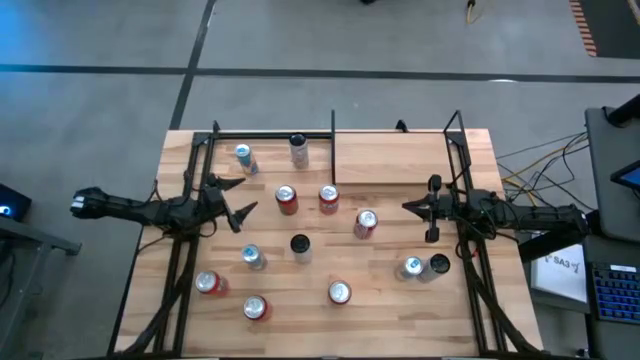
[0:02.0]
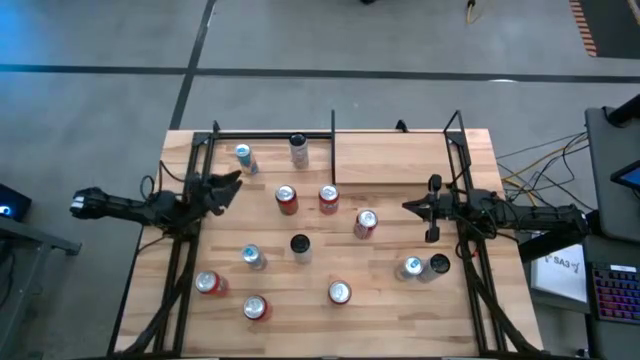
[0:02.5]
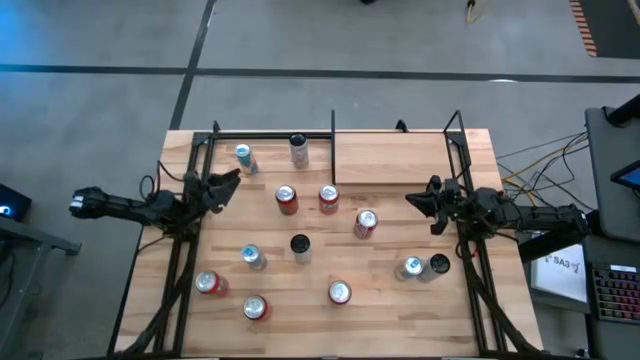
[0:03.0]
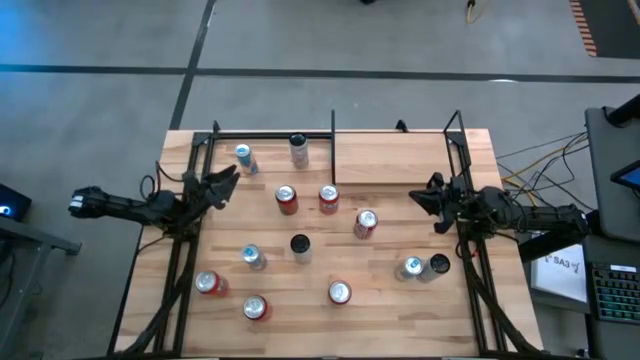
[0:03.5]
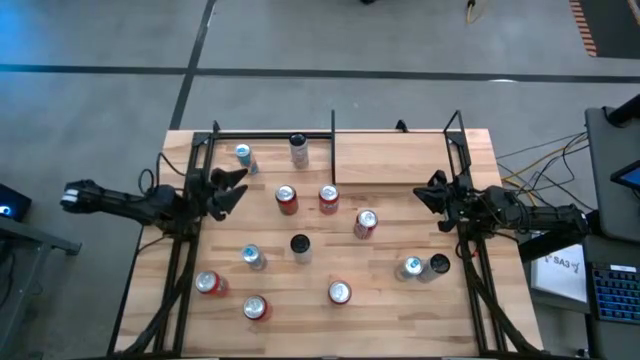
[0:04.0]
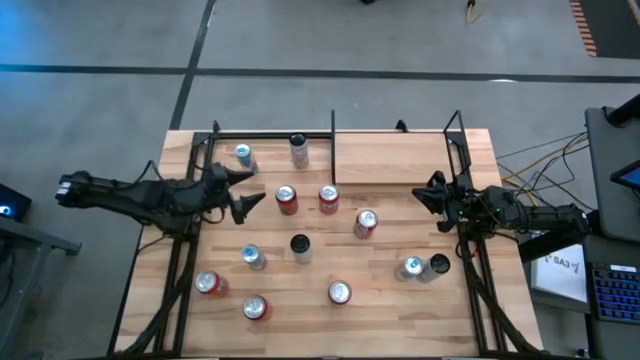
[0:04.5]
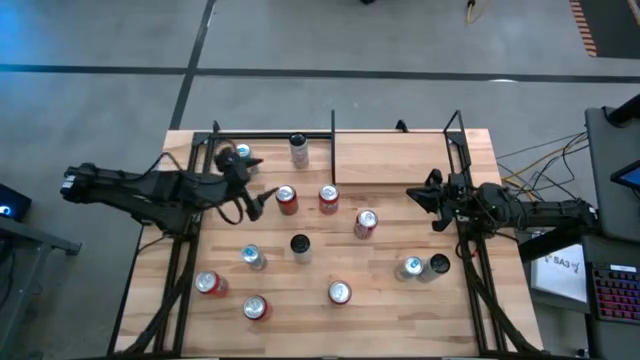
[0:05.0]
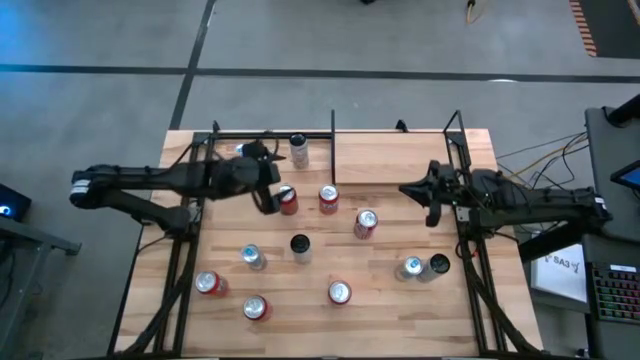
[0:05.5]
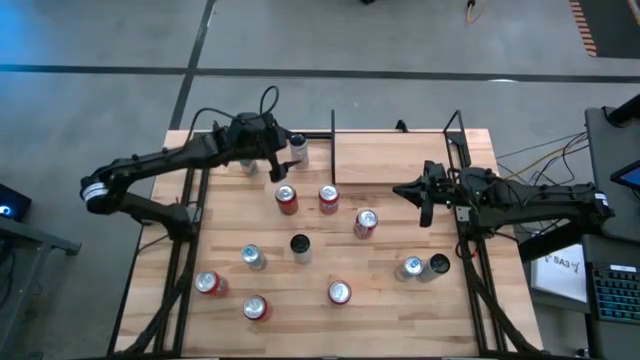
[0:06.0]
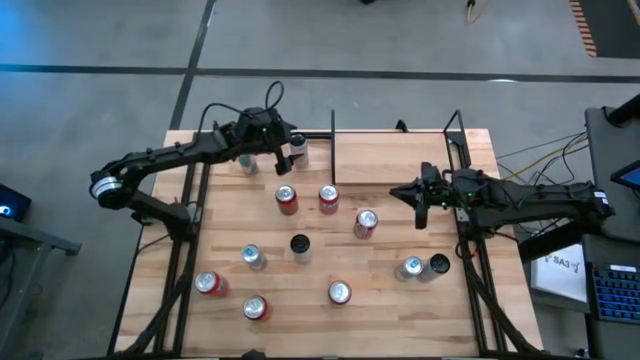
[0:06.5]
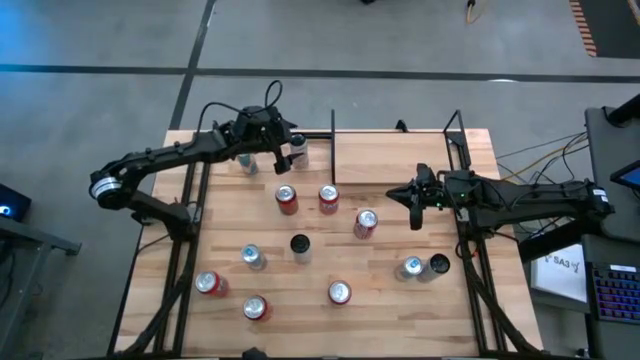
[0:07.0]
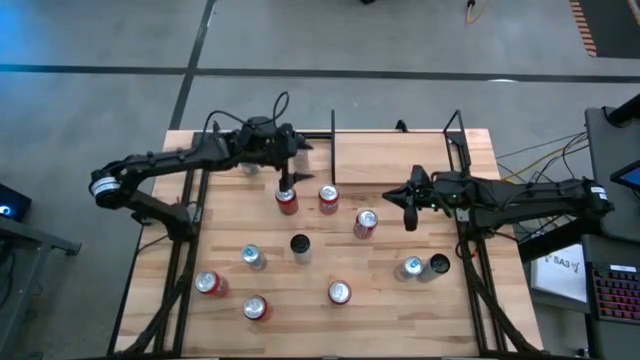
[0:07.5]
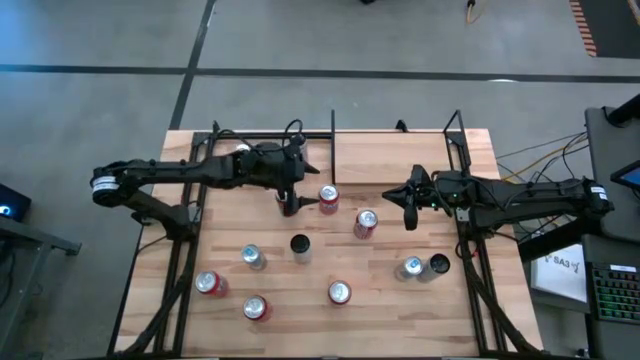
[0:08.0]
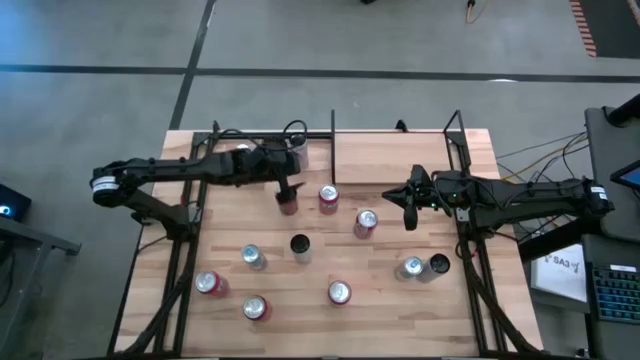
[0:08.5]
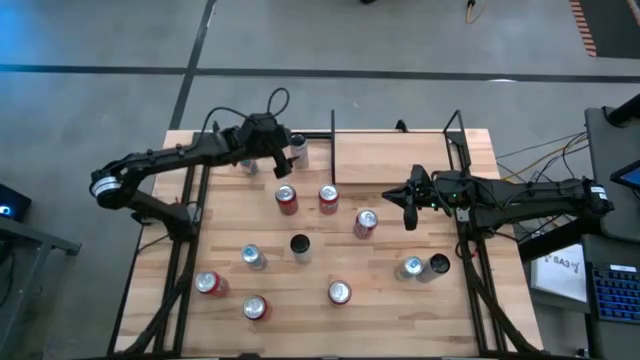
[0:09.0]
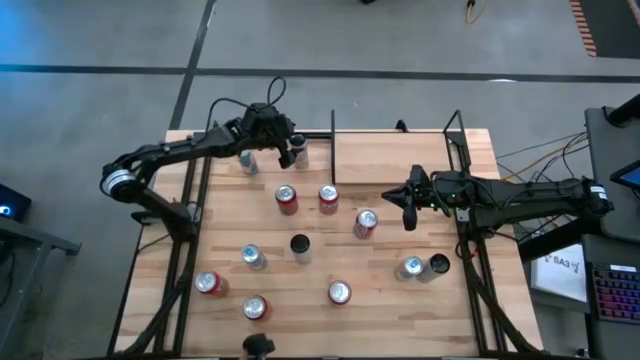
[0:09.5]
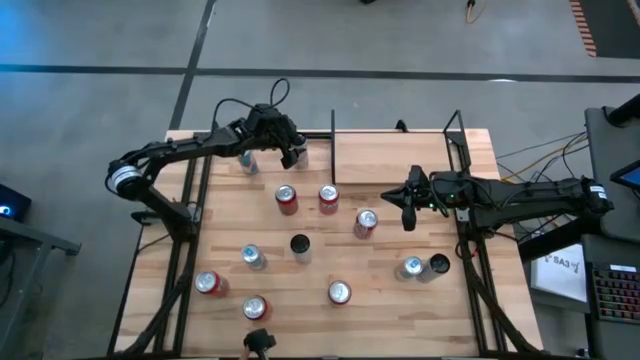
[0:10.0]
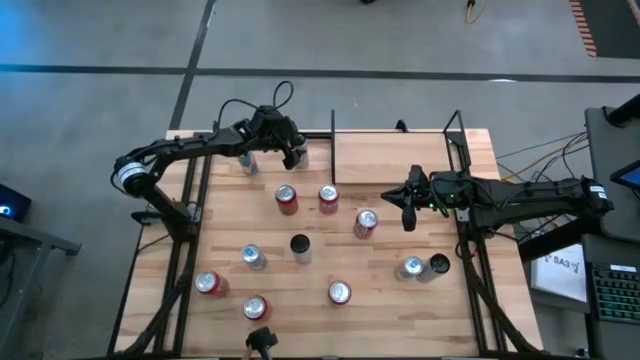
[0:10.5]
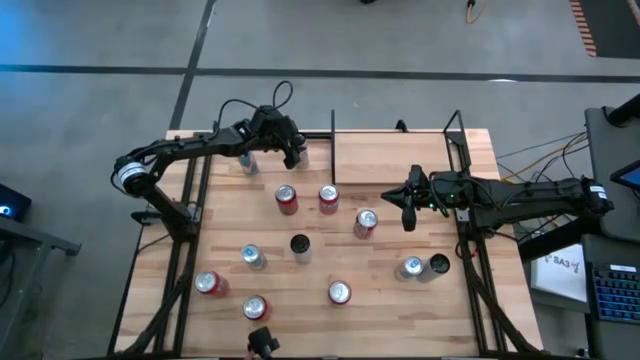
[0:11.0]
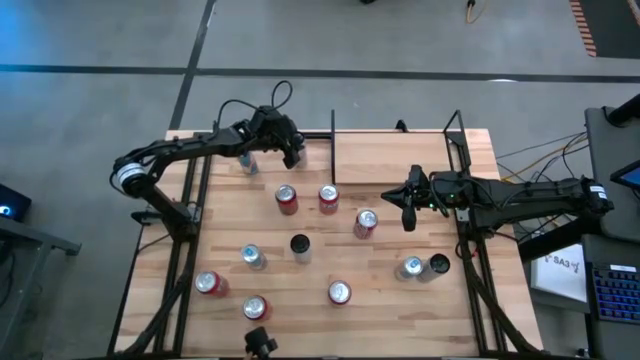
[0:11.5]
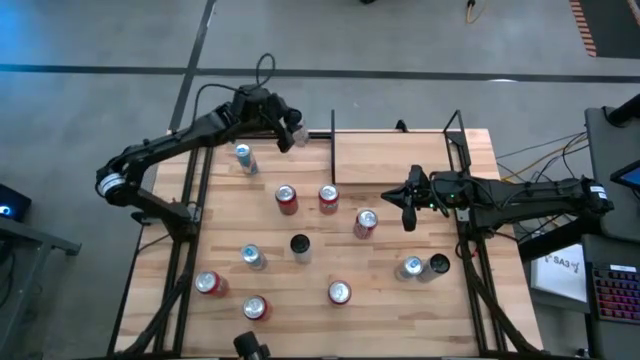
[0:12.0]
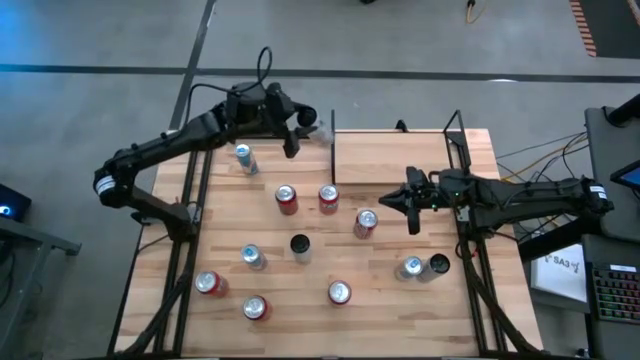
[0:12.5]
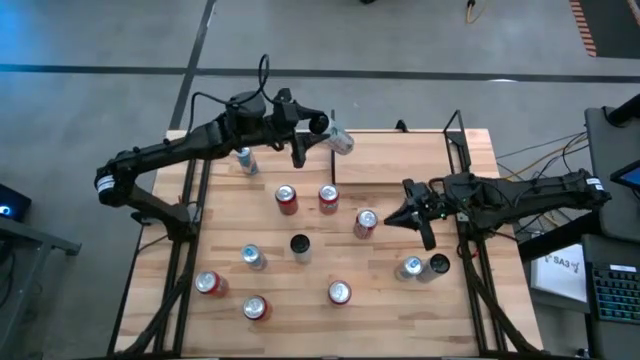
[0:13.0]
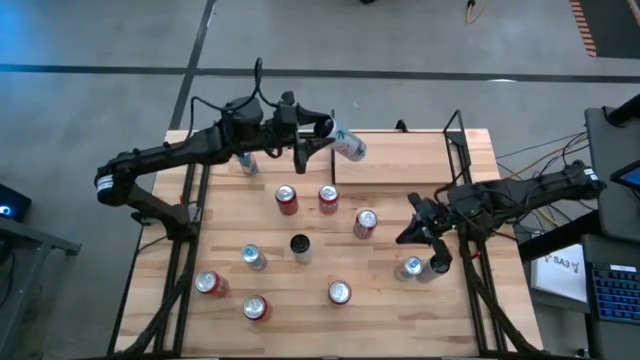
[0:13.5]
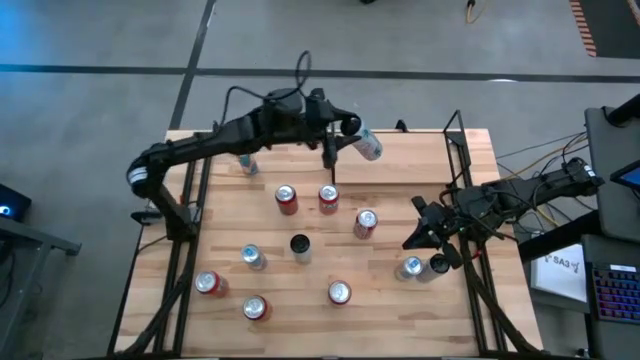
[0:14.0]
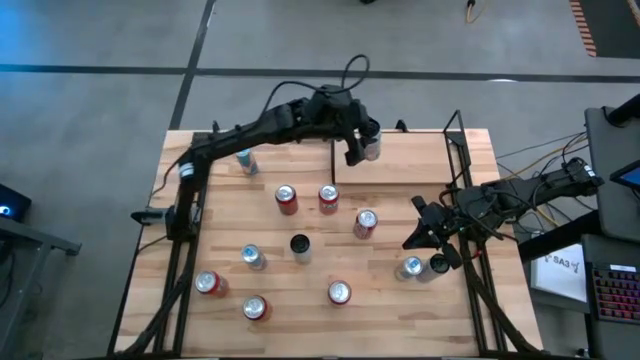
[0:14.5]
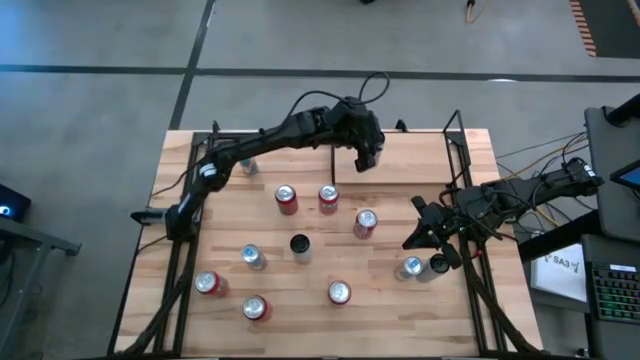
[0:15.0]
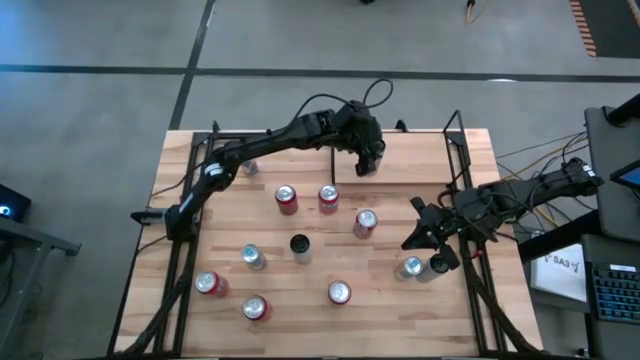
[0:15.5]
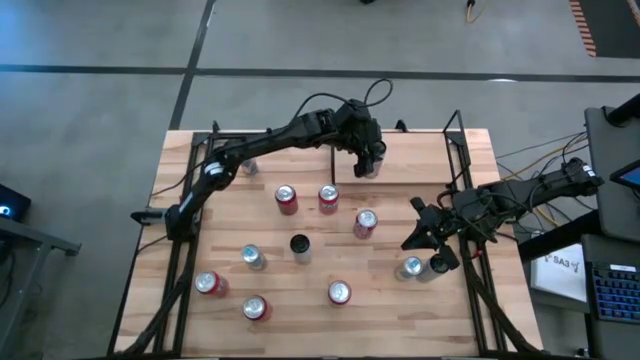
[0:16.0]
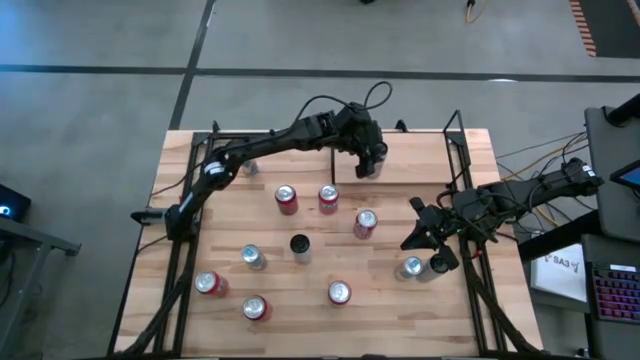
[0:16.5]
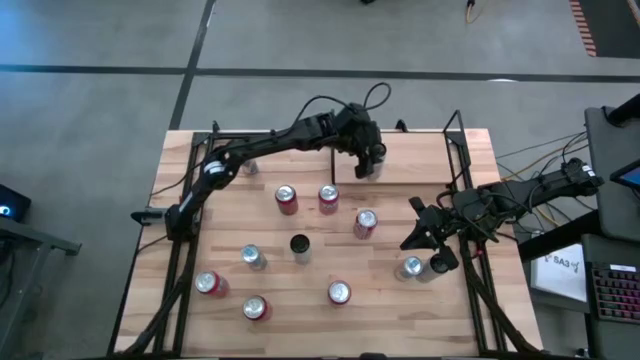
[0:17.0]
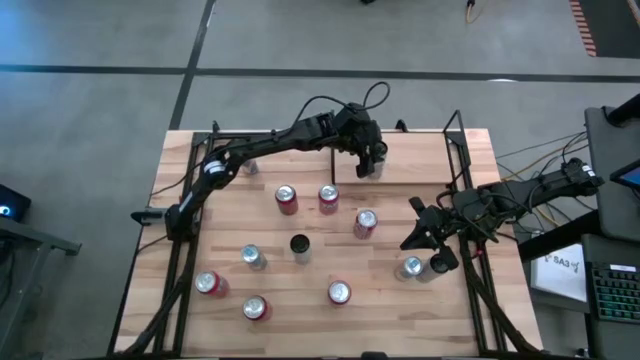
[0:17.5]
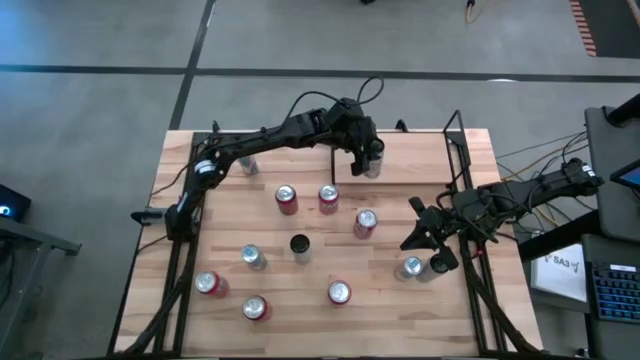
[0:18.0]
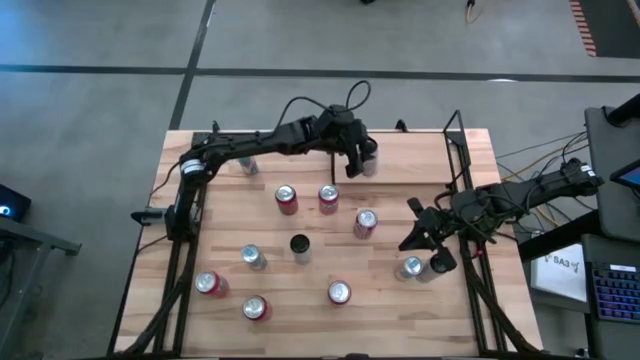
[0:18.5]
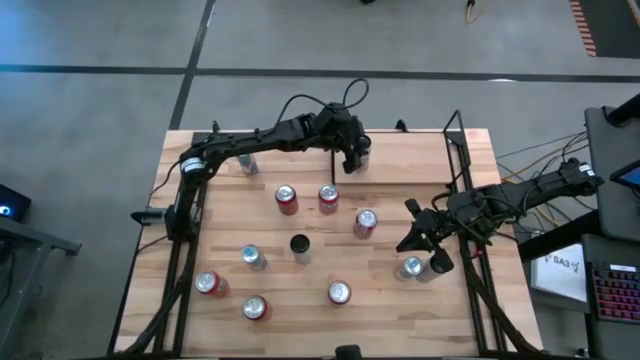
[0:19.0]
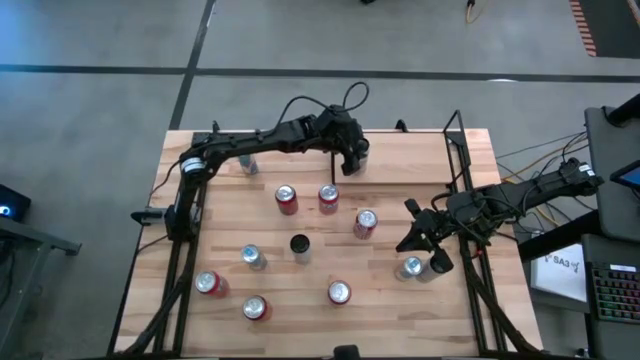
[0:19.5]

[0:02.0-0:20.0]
Task: Place canned beverage on shelf
Put the top white soda can on the shelf

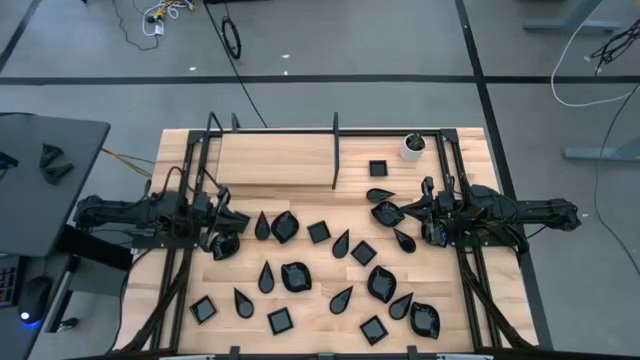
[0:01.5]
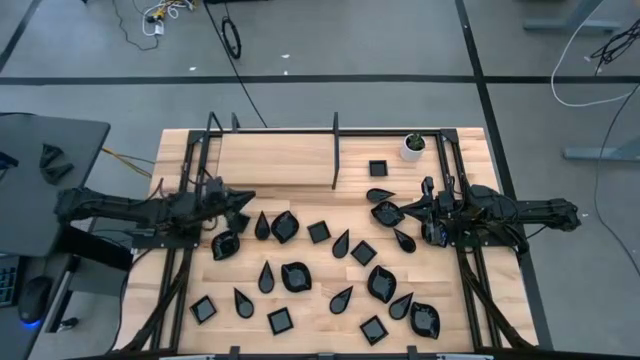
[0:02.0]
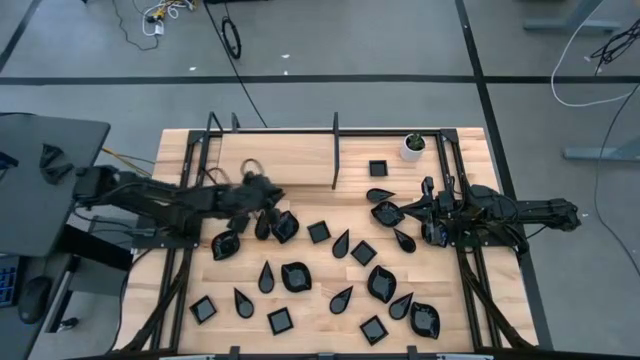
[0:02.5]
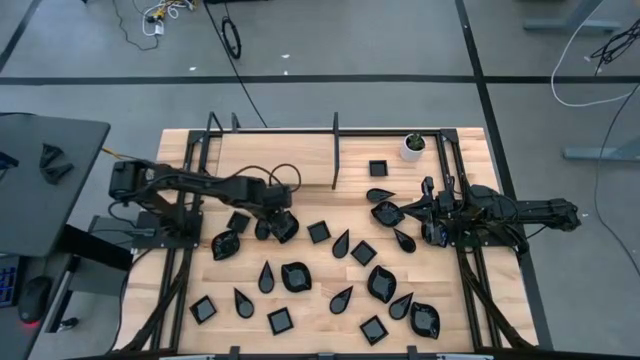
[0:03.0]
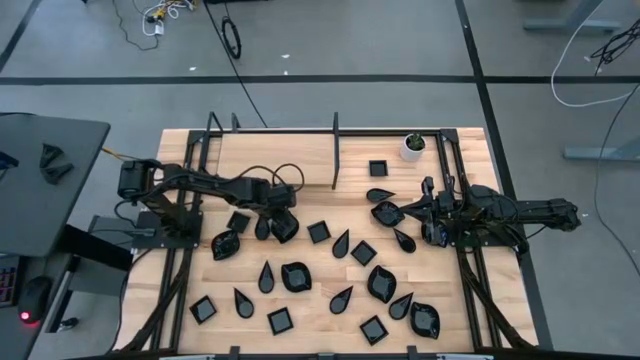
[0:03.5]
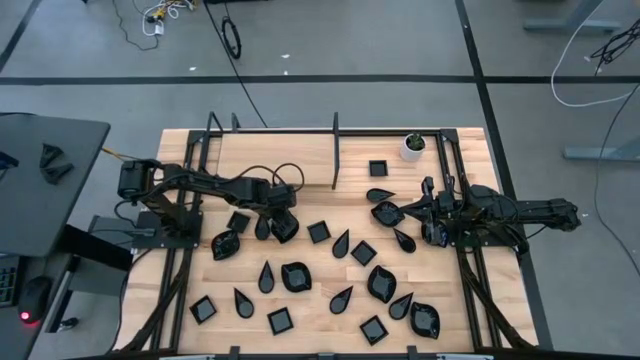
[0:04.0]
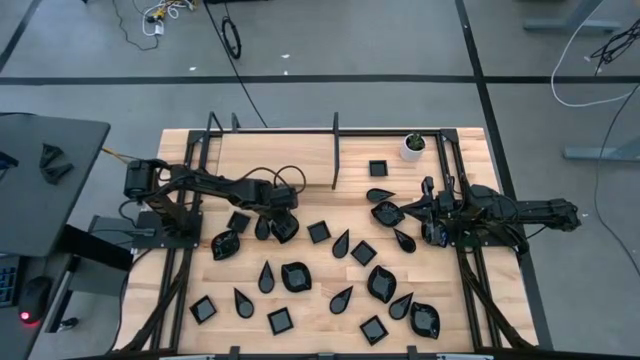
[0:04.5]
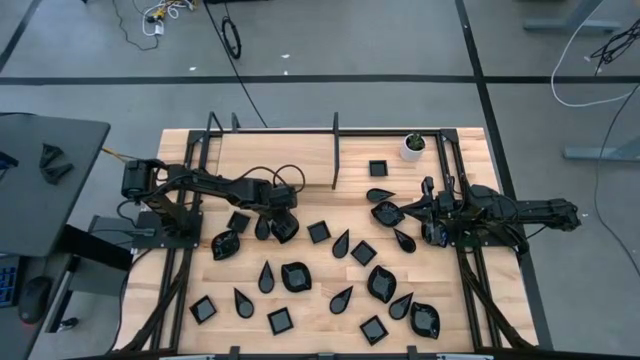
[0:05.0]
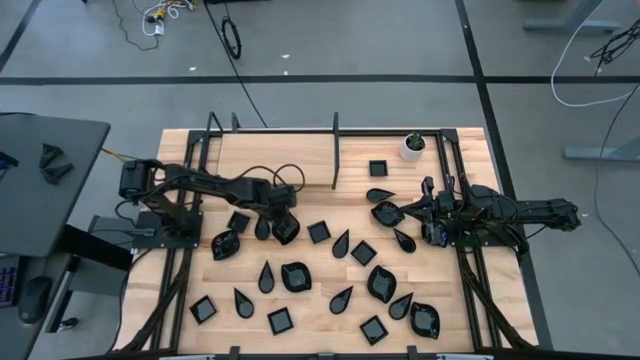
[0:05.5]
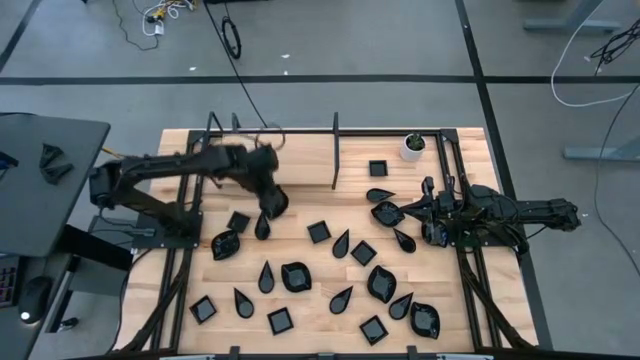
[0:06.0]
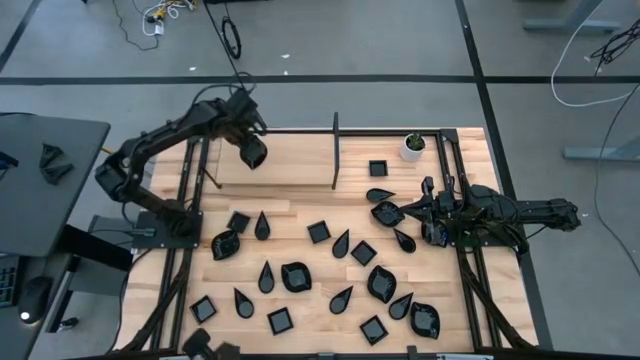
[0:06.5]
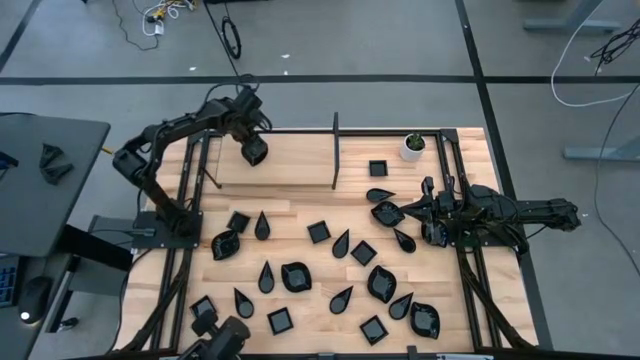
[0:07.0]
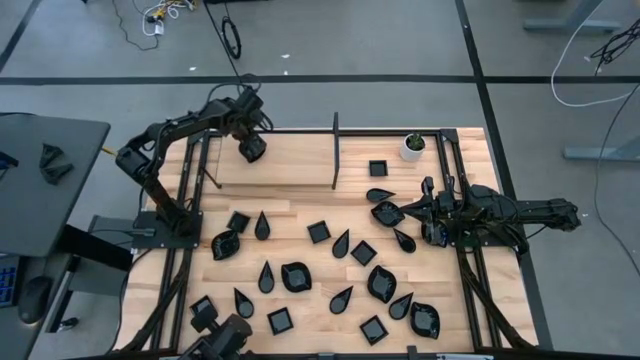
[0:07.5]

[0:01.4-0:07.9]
Task: Pick & Place Mini shaped plates
Put the black leaf-shaped plate on the shelf
